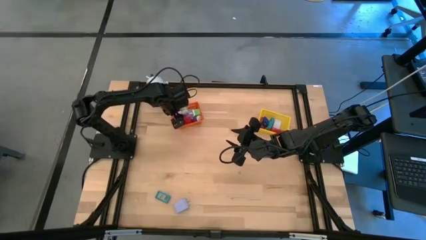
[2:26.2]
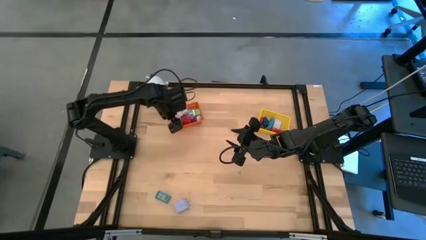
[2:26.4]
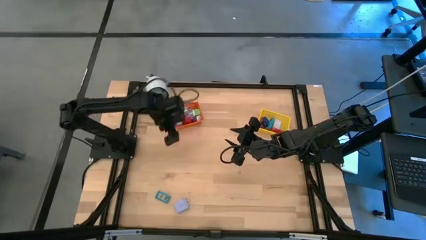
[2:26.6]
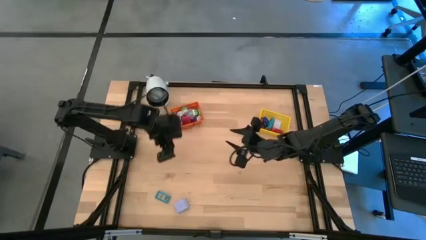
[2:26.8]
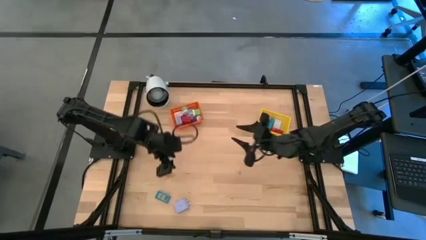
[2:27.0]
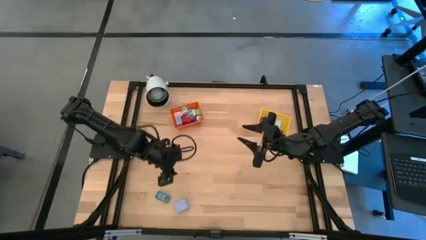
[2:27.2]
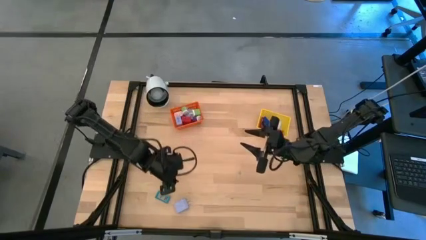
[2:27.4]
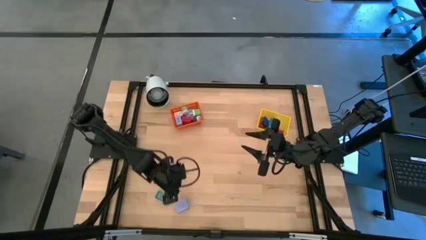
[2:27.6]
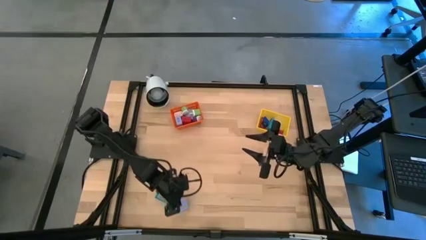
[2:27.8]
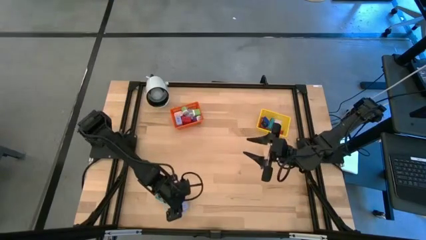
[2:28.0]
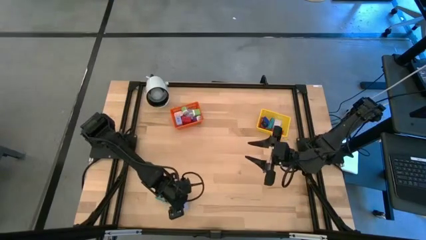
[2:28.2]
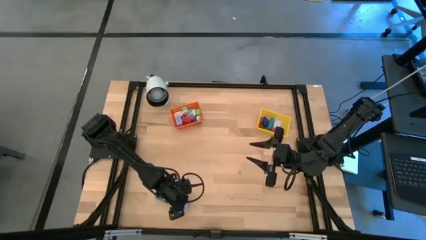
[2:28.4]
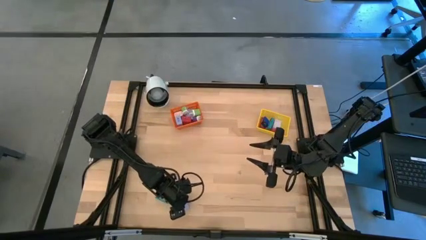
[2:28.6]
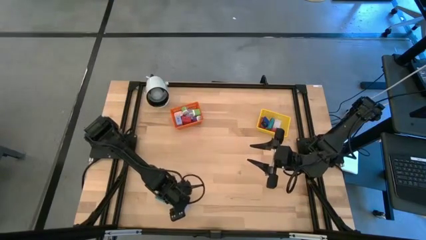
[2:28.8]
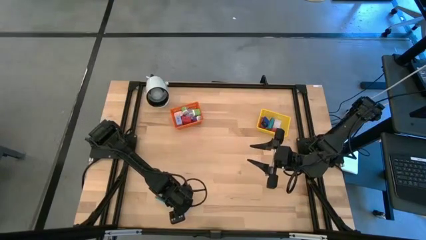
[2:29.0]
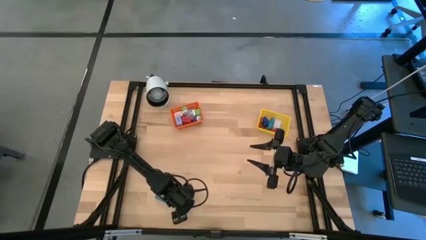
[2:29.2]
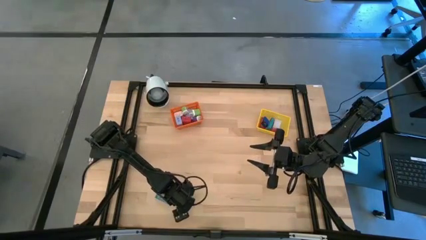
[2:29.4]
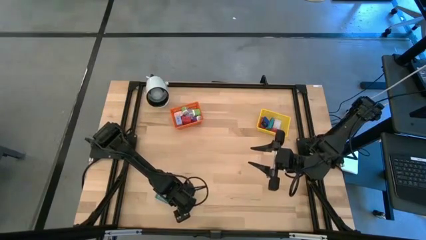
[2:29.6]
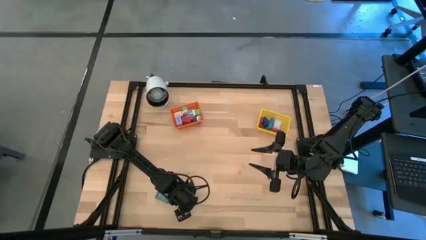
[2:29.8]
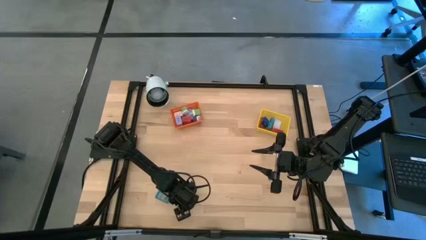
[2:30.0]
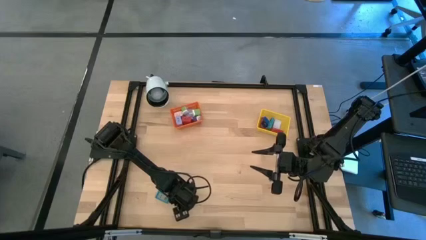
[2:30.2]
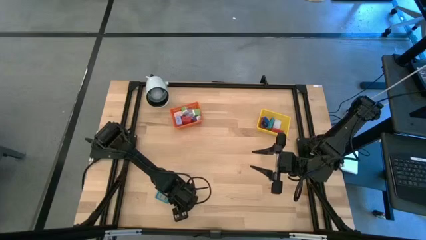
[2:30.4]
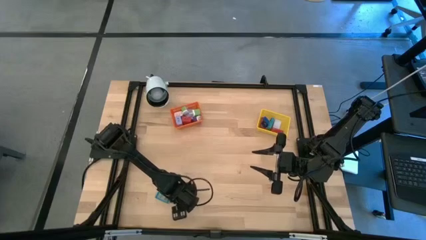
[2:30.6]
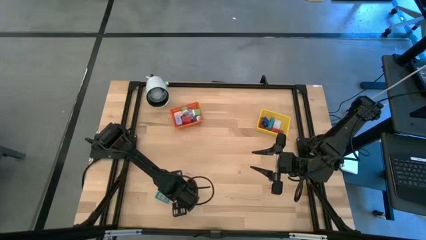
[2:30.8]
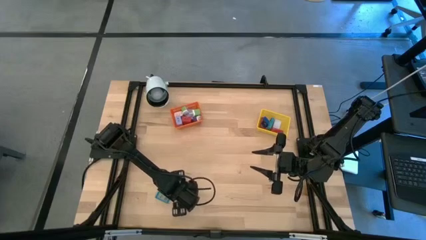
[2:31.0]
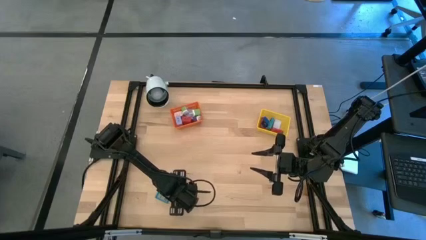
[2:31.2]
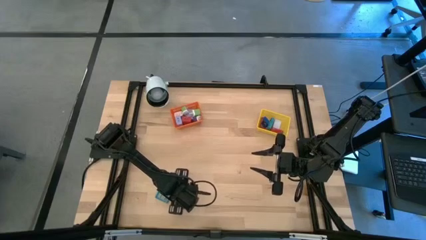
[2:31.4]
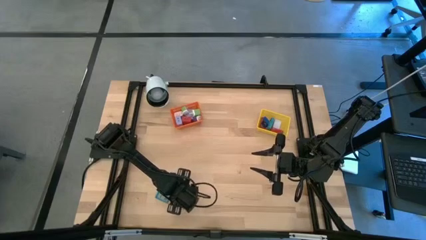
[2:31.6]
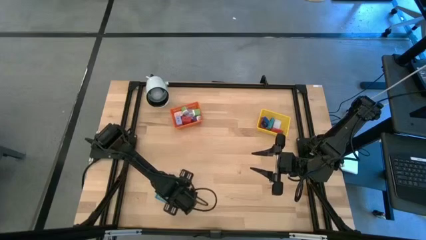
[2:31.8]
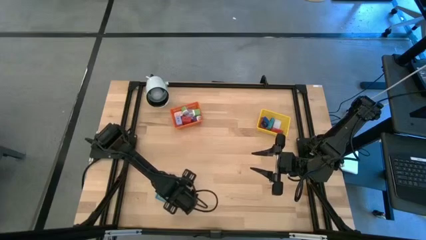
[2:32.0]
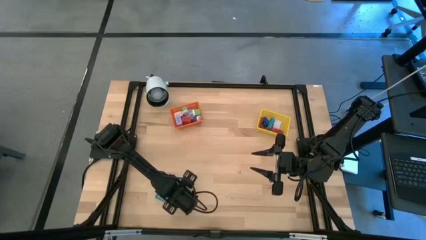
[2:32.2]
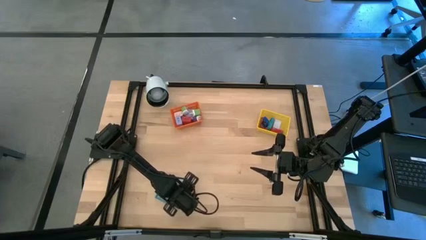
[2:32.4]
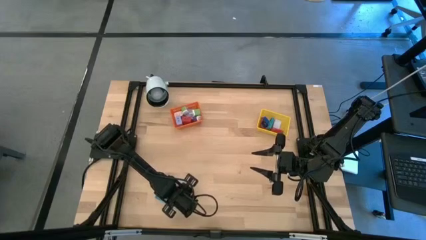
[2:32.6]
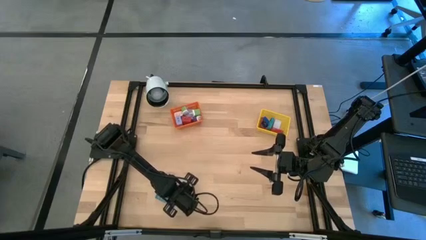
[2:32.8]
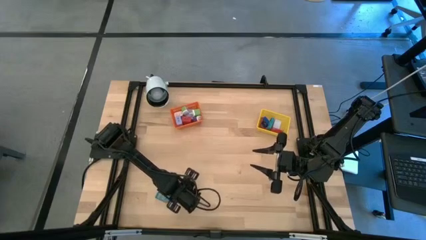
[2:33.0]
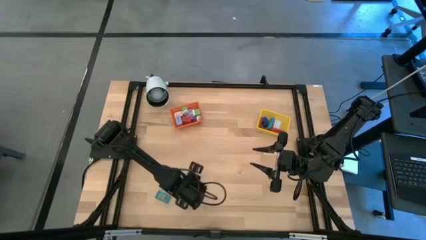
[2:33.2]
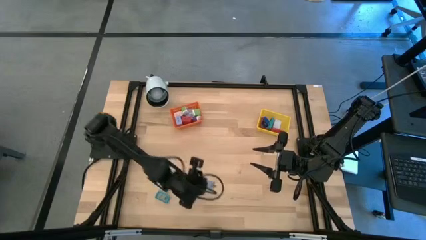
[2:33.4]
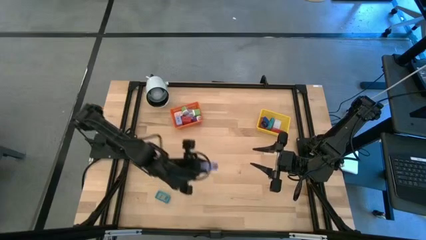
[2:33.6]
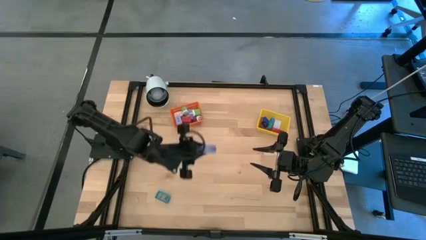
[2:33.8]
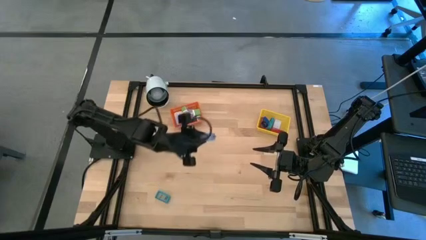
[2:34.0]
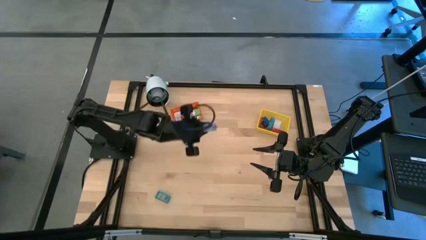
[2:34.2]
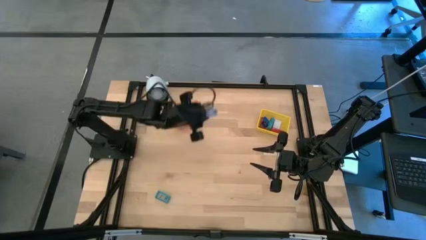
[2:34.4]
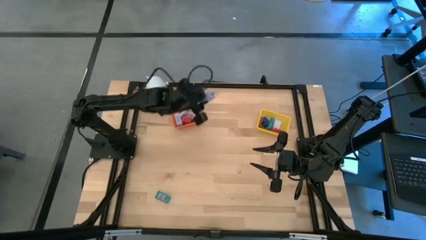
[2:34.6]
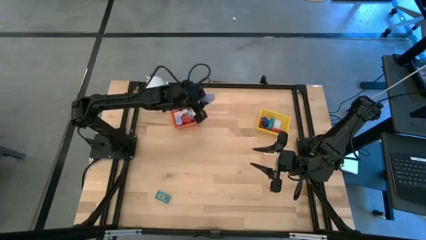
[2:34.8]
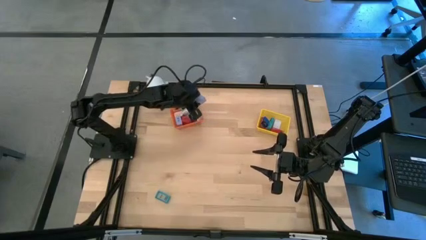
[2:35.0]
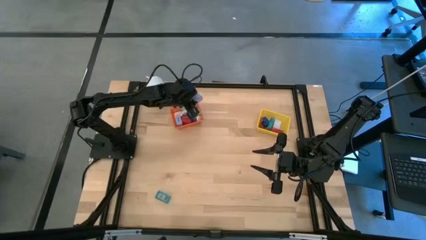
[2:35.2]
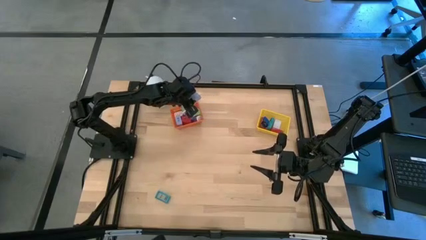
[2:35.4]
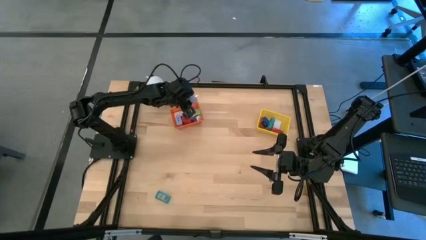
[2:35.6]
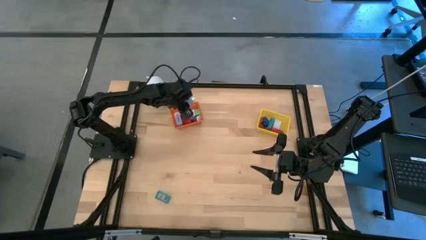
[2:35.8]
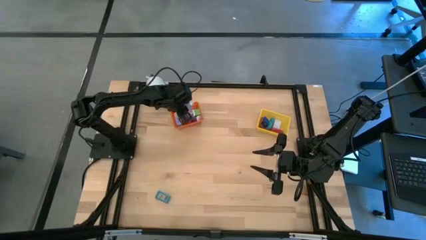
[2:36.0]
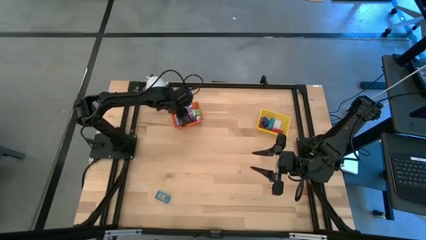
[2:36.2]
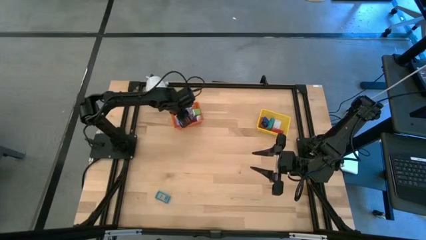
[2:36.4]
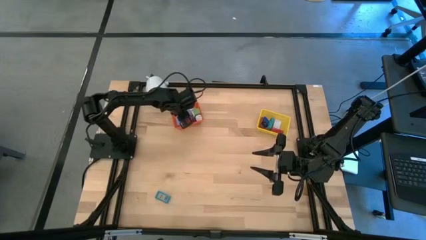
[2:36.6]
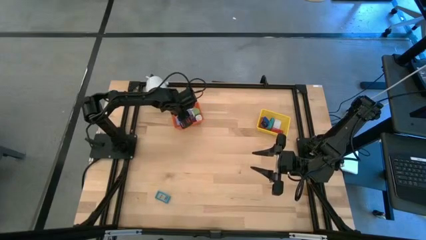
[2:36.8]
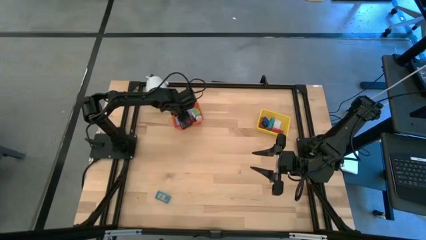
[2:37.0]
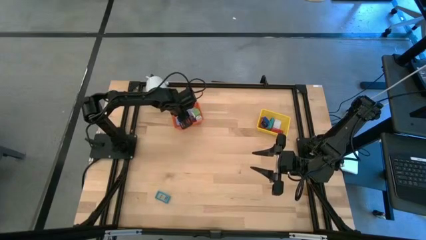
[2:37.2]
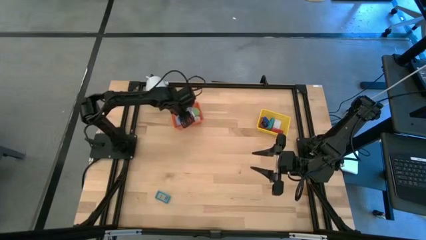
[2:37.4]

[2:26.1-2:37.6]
Task: Pick & Place Office items
Put the purple charger adapter into the orange bin

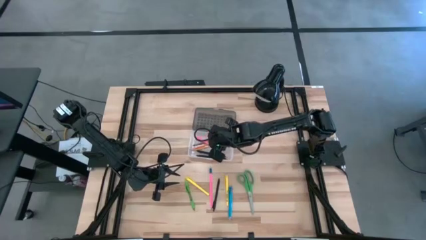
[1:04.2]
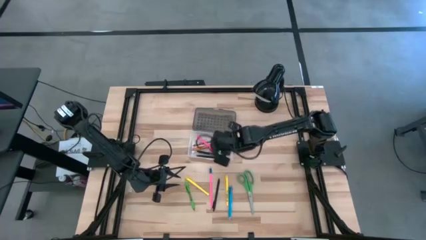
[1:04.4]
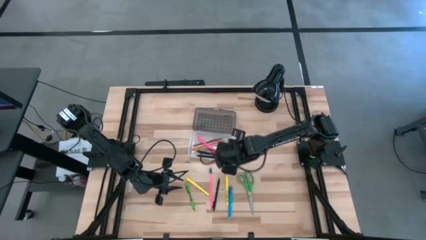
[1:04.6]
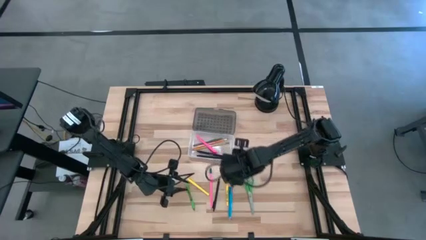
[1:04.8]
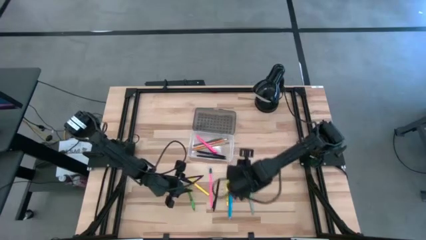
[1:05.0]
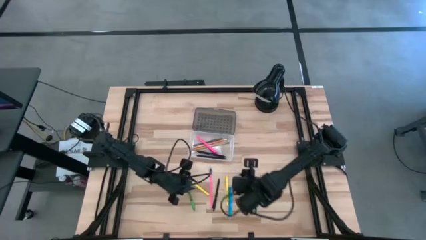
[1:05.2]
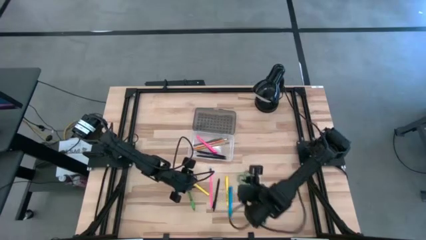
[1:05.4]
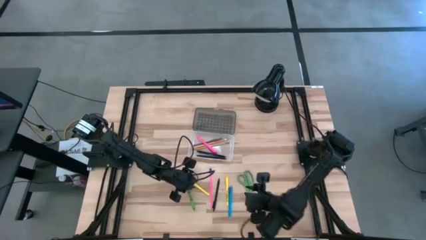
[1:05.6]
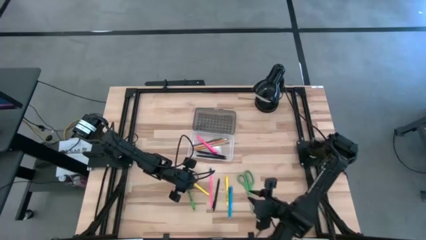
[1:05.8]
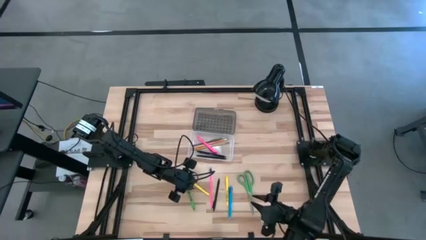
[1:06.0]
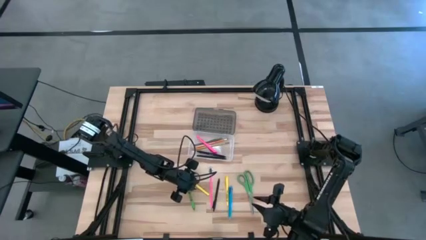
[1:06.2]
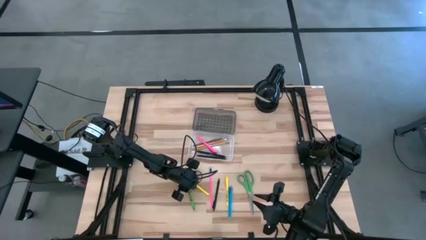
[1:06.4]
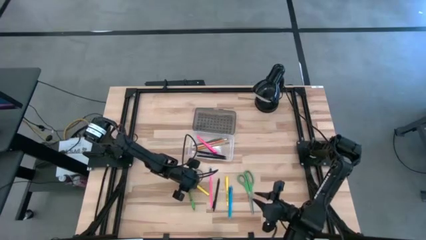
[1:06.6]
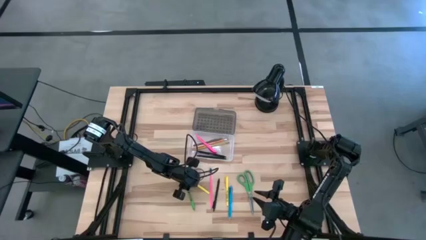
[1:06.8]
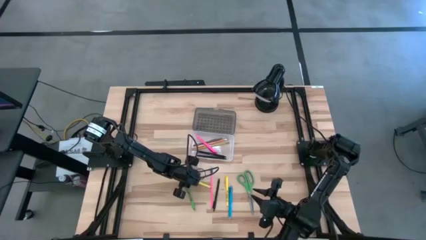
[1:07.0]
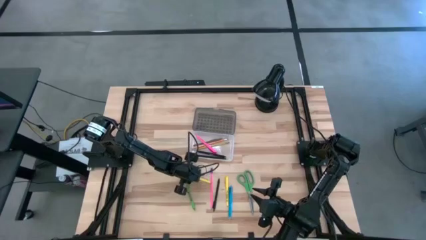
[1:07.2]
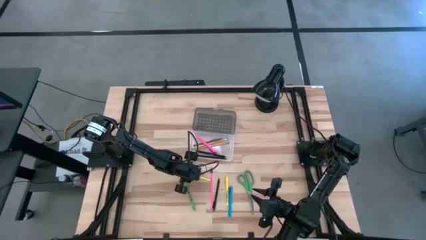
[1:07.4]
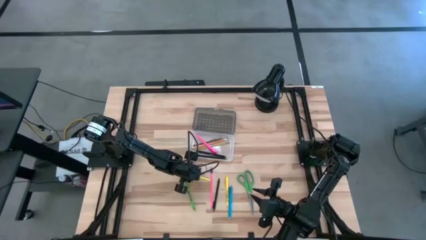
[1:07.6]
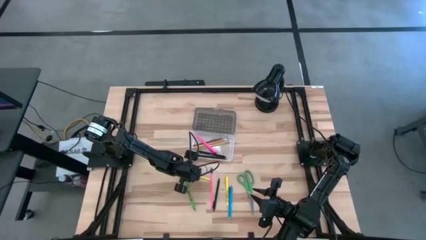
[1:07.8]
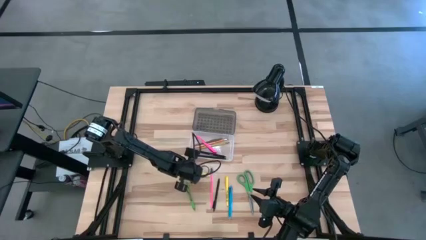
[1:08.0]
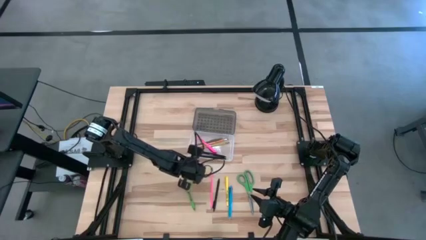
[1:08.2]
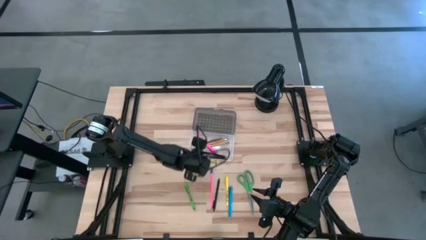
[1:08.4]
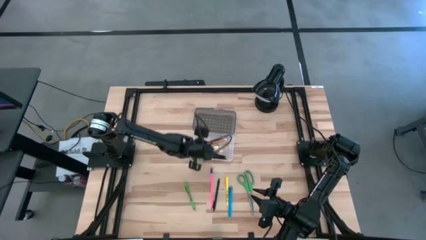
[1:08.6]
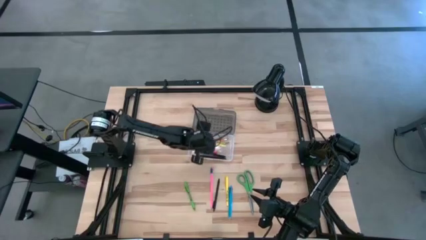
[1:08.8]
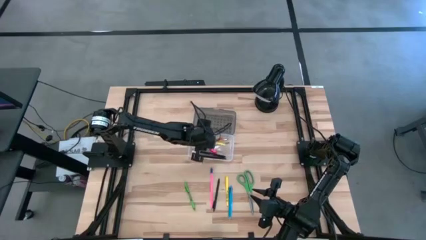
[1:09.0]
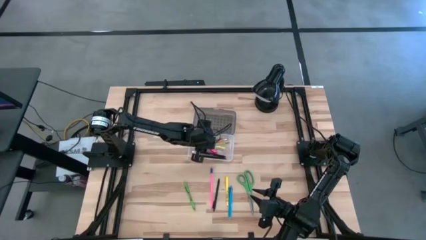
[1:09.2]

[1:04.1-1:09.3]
Task: Pick & place school supplies into a supply box
Put the left yellow pen into the transparent supply box
